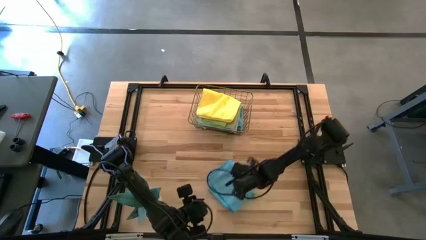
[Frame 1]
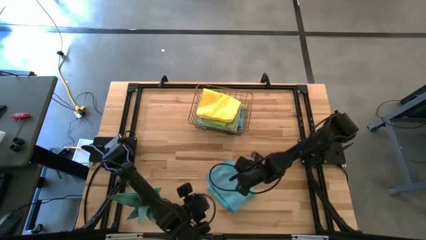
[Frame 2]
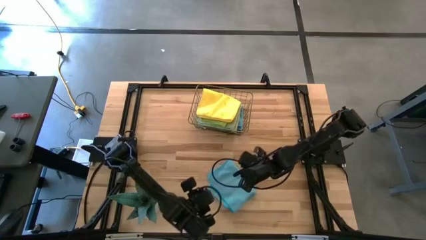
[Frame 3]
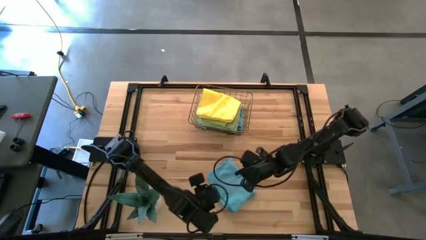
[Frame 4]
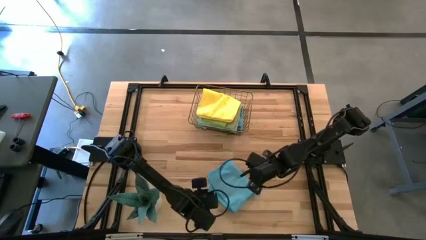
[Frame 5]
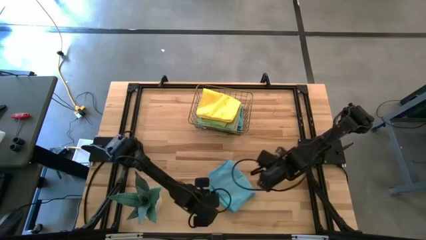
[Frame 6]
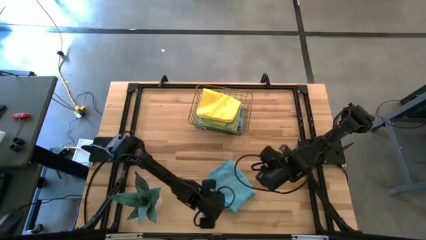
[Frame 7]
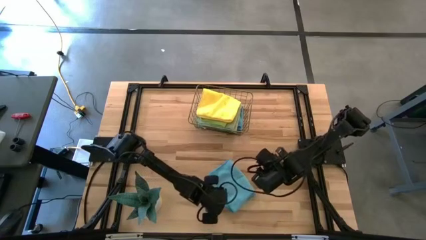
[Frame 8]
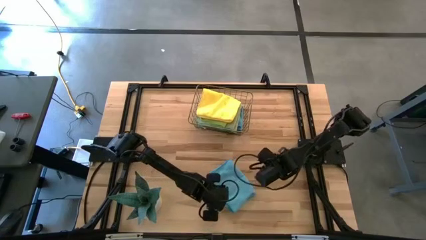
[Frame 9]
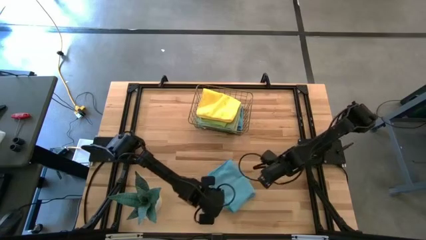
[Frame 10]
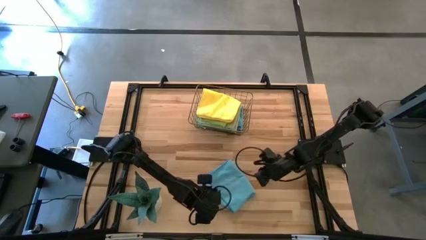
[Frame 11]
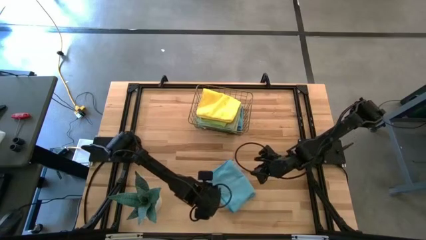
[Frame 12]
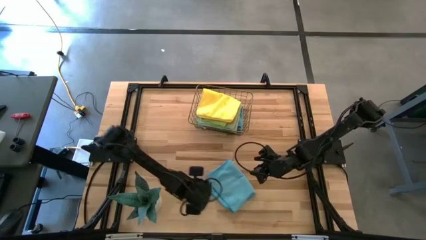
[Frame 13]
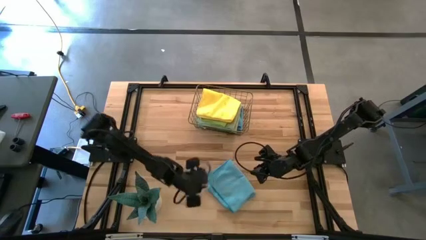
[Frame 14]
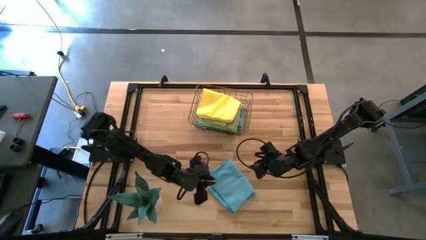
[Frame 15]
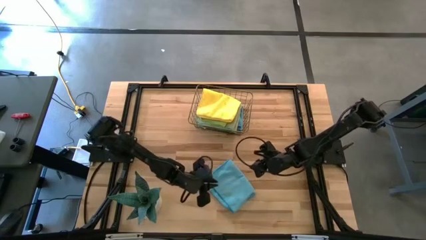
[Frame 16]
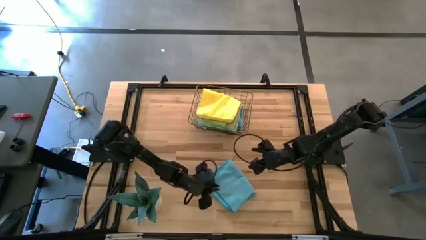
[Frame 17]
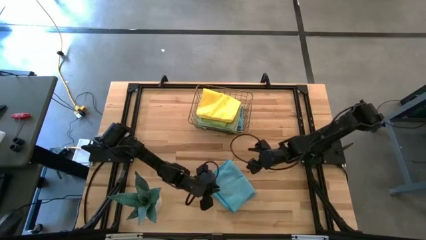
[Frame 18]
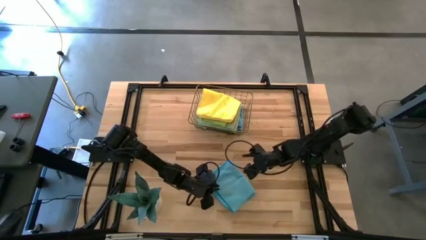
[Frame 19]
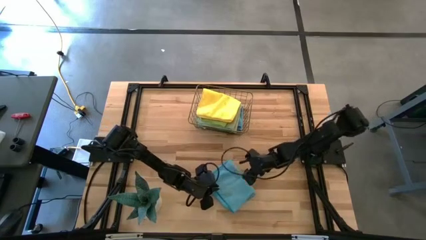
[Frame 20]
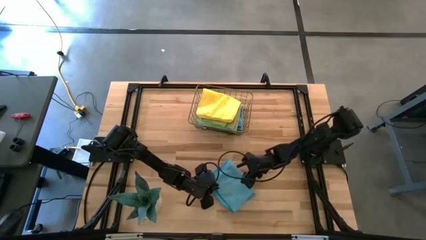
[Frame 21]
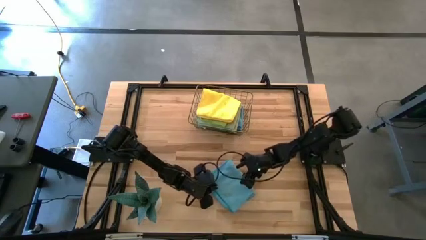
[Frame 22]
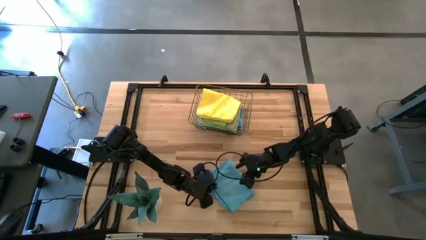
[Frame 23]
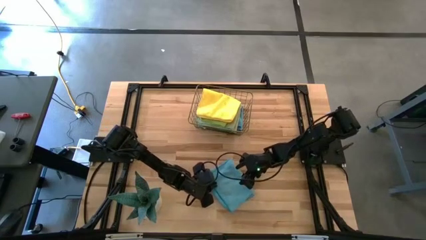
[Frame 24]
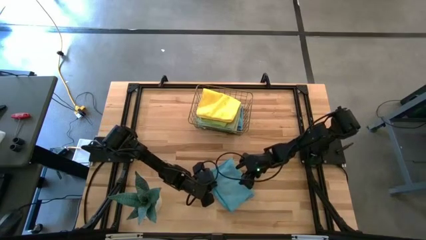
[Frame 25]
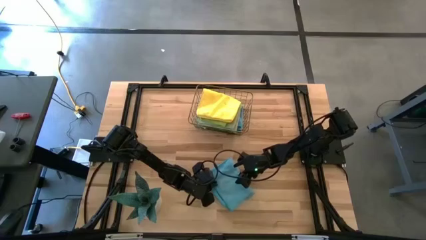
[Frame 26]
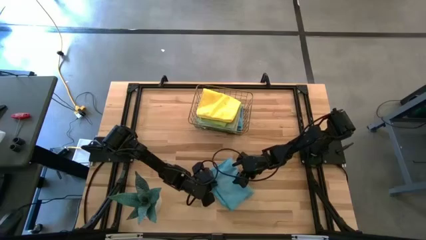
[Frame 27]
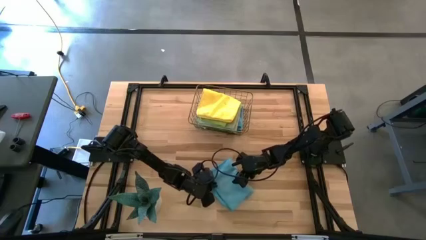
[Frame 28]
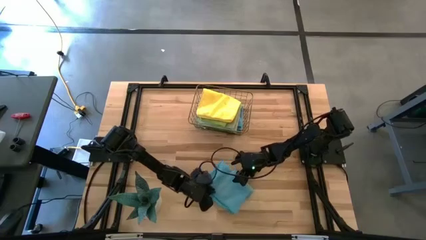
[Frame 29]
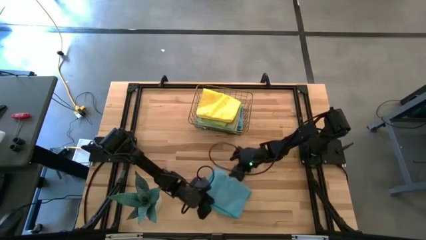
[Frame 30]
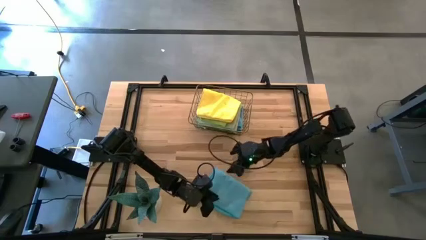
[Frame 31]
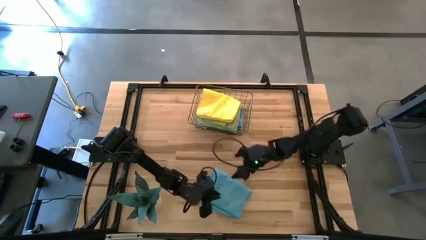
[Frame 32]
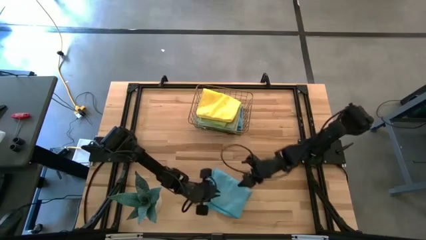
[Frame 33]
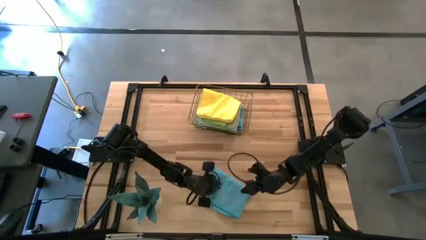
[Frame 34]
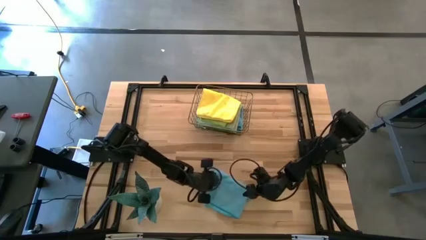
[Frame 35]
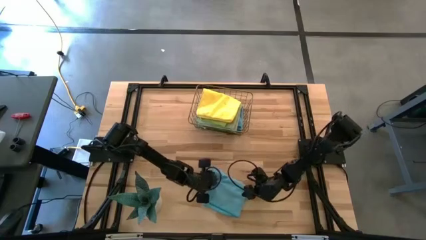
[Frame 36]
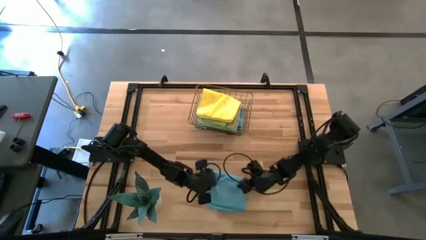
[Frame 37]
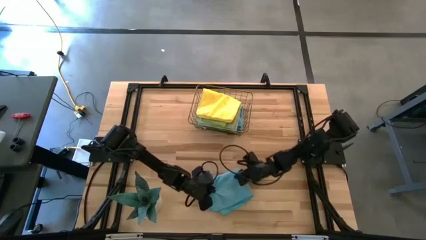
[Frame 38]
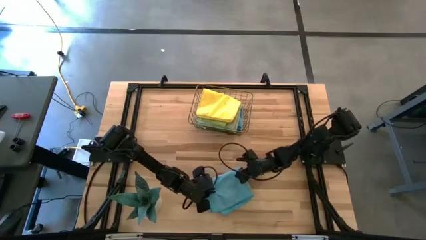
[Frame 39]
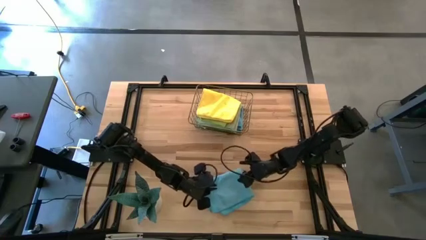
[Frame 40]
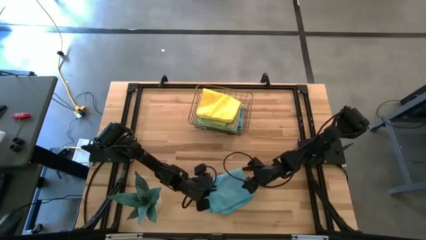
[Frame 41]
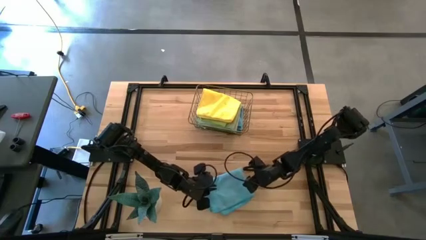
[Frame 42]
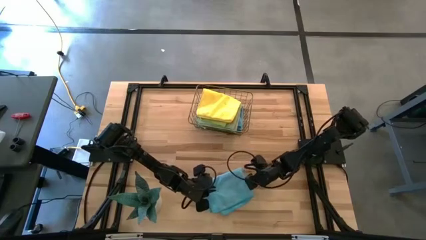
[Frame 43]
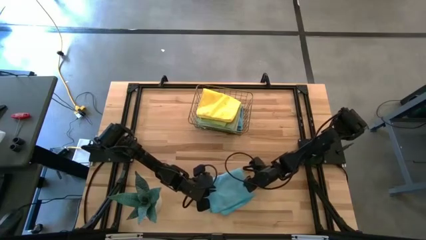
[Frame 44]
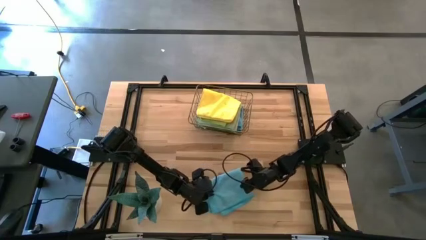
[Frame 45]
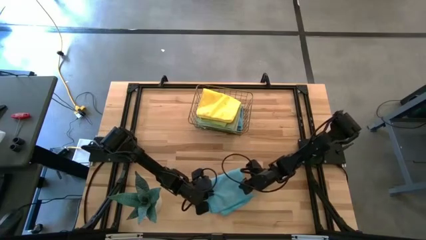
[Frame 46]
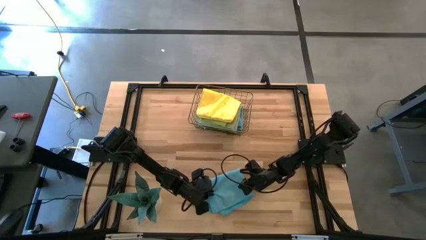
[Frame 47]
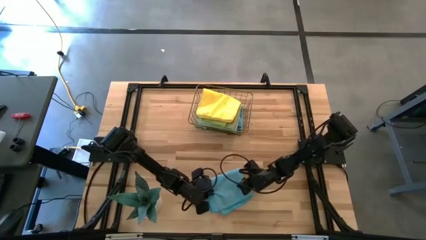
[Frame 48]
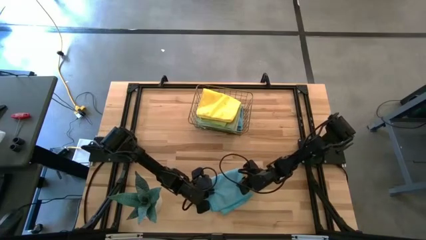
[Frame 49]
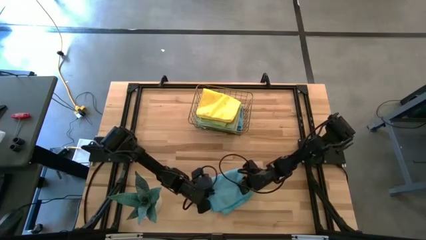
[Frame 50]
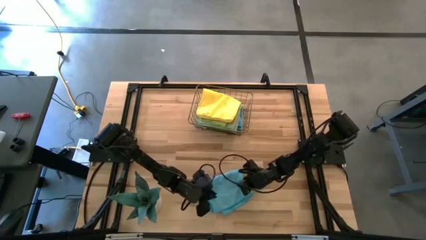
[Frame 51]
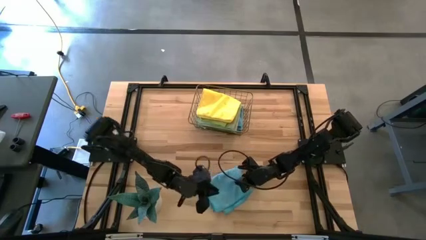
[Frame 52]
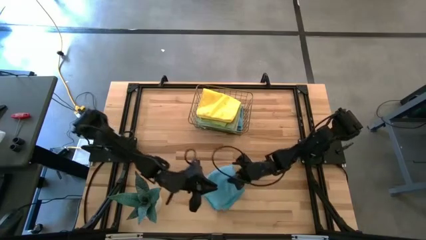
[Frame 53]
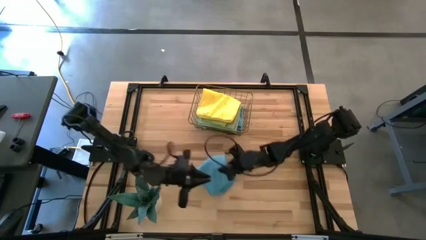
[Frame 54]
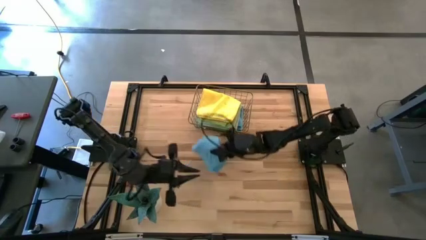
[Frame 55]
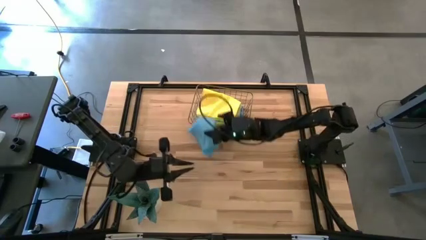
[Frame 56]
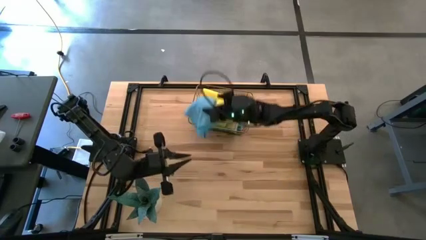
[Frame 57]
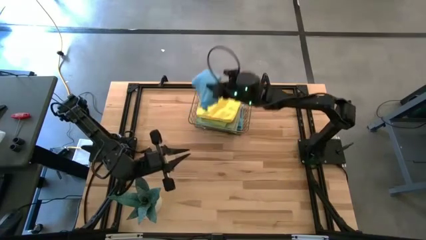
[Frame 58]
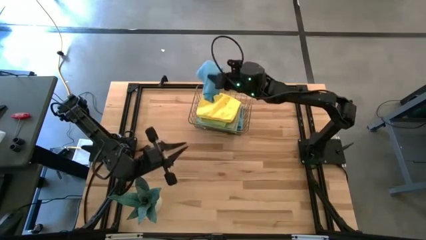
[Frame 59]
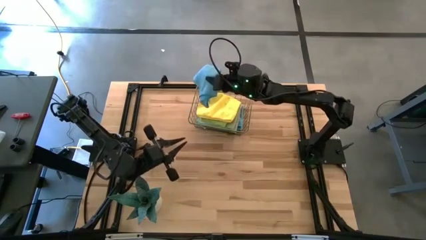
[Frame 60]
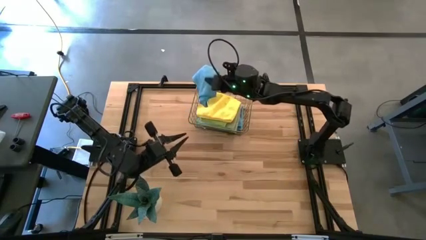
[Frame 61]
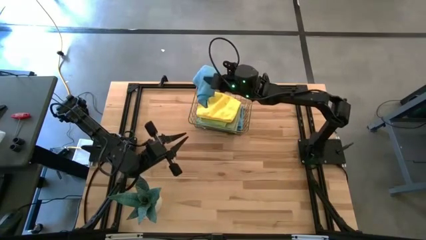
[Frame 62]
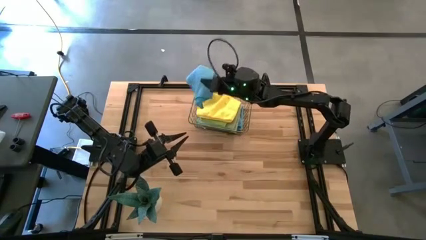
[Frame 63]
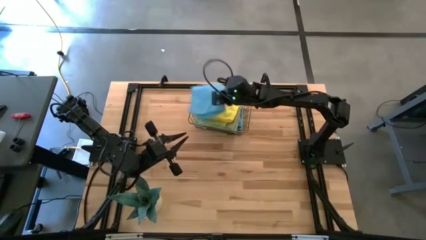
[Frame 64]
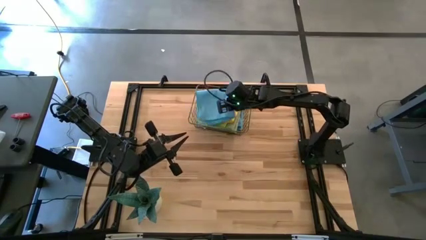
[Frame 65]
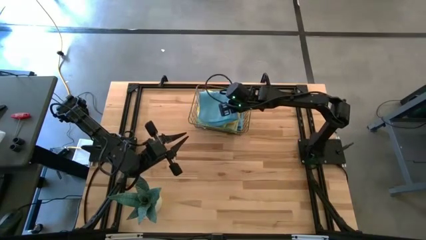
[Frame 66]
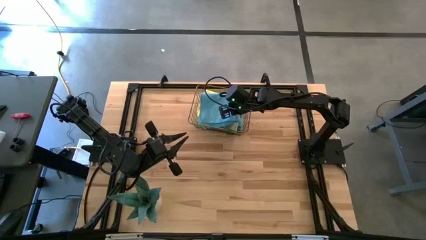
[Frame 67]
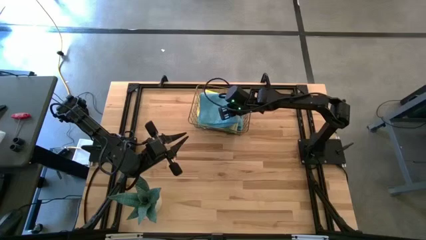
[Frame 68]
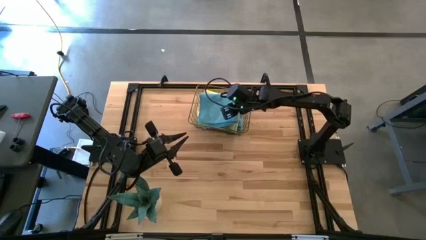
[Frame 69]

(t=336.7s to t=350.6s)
Task: Fold microfiber towels
Stack the blue towel on top of the stacked towels into the wire basket
